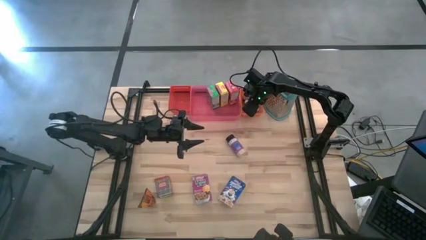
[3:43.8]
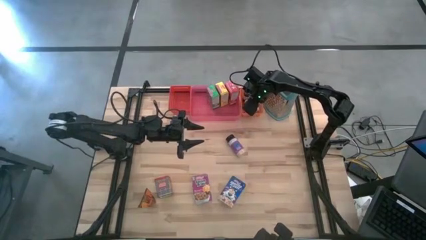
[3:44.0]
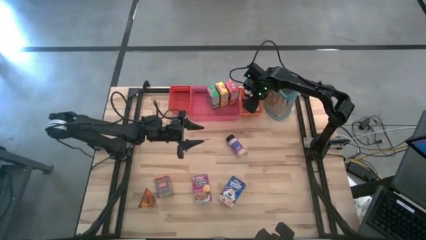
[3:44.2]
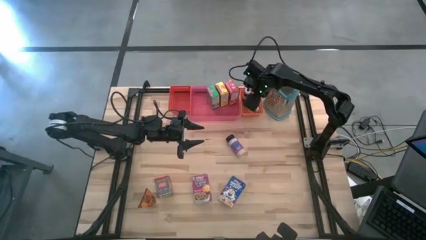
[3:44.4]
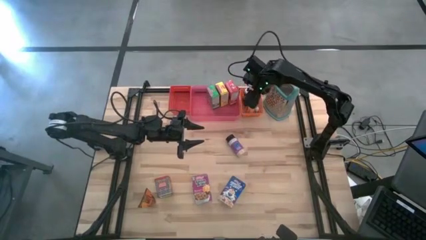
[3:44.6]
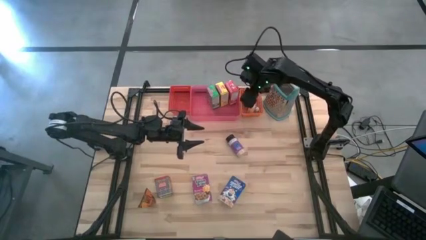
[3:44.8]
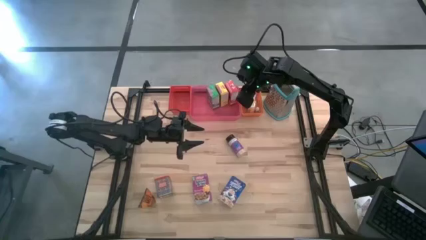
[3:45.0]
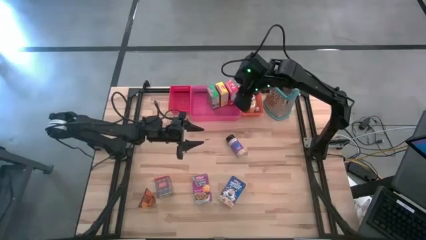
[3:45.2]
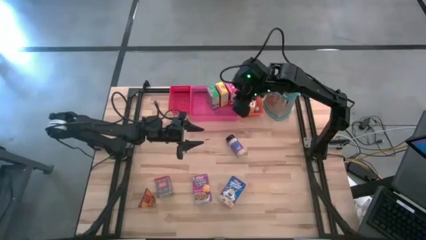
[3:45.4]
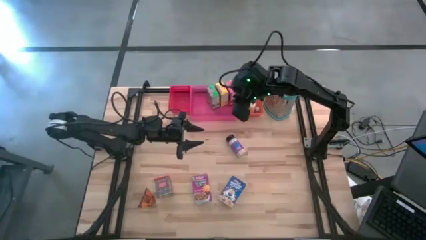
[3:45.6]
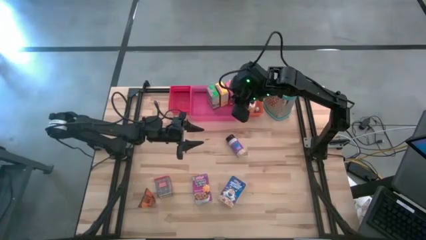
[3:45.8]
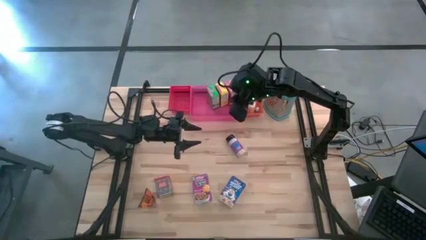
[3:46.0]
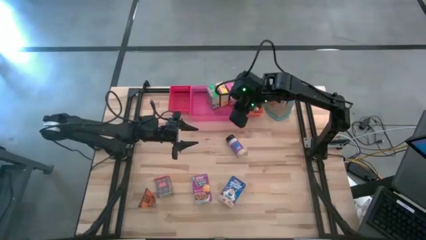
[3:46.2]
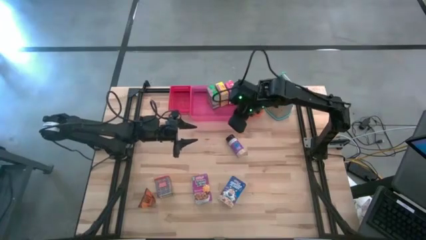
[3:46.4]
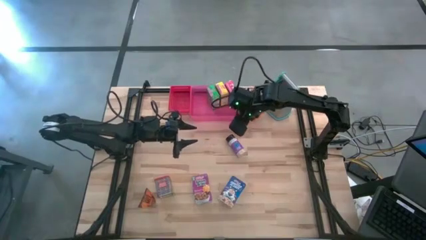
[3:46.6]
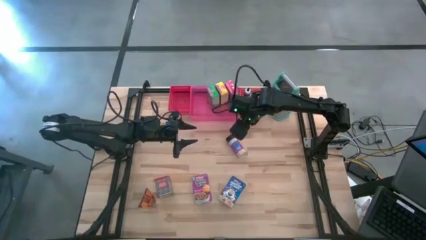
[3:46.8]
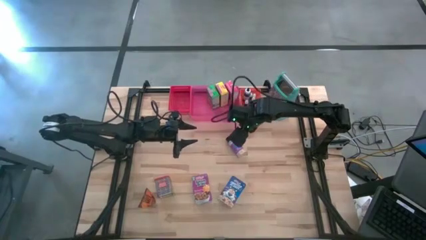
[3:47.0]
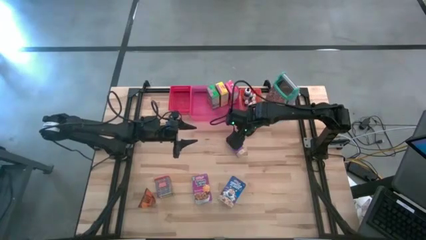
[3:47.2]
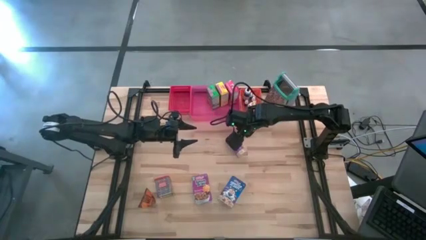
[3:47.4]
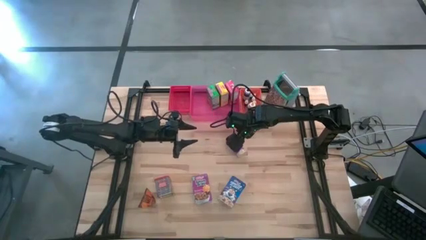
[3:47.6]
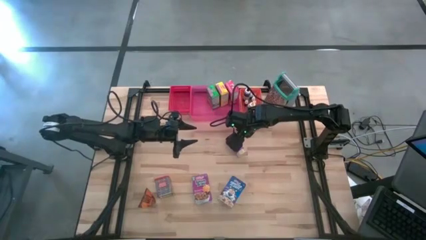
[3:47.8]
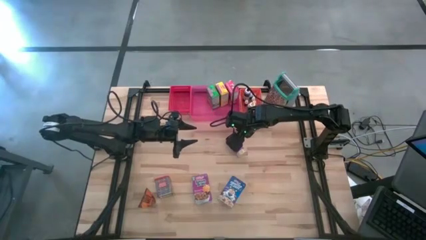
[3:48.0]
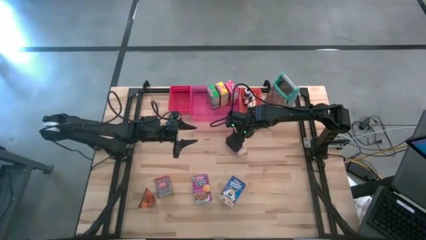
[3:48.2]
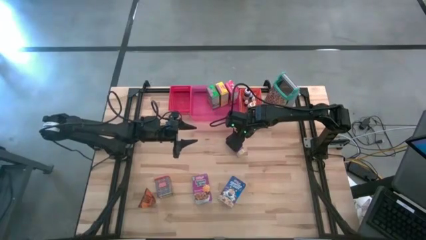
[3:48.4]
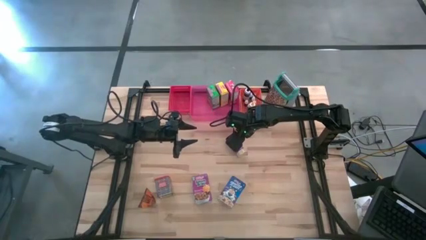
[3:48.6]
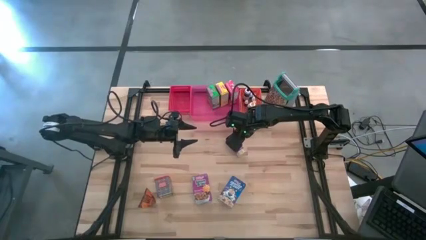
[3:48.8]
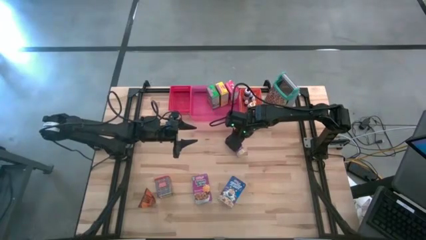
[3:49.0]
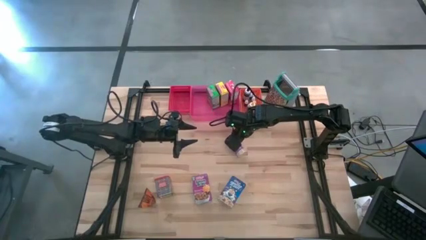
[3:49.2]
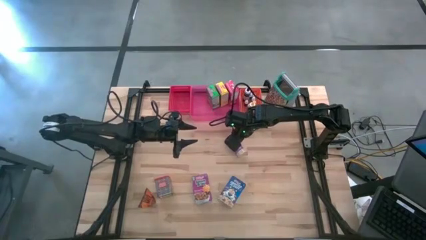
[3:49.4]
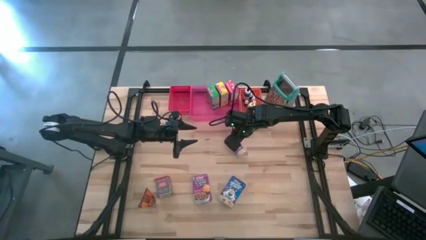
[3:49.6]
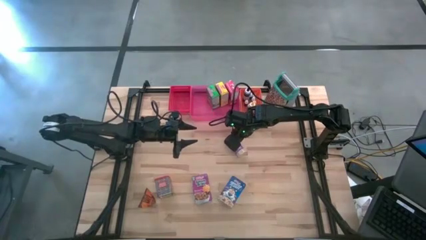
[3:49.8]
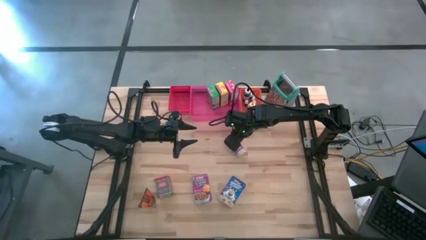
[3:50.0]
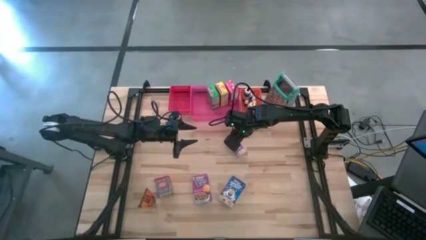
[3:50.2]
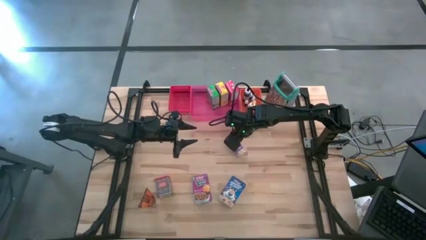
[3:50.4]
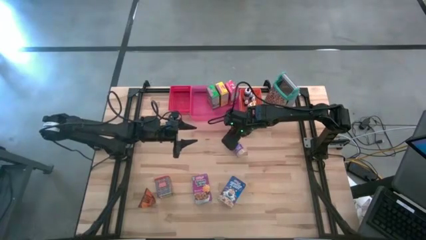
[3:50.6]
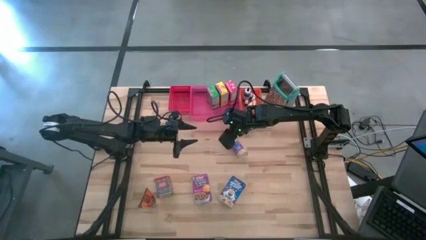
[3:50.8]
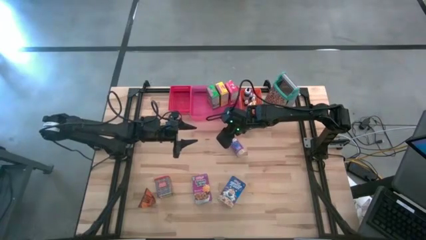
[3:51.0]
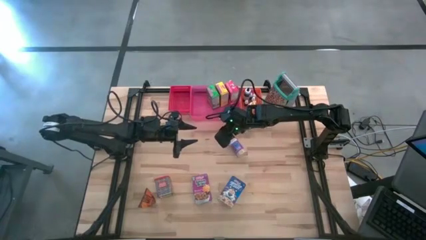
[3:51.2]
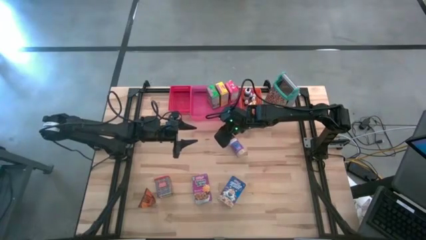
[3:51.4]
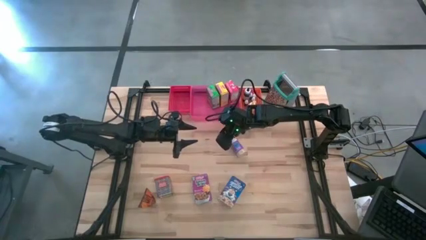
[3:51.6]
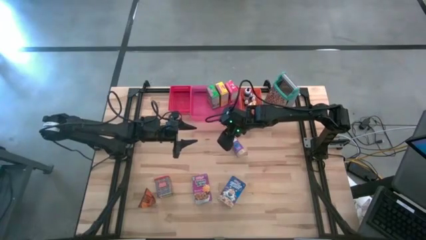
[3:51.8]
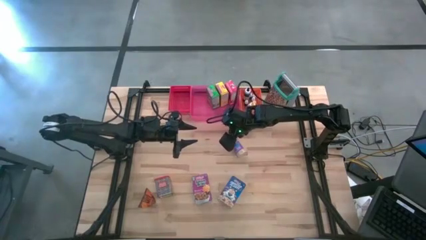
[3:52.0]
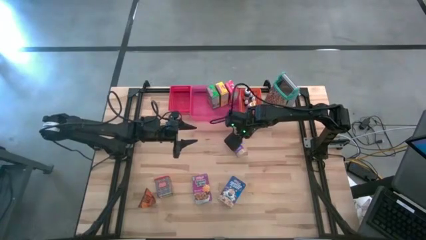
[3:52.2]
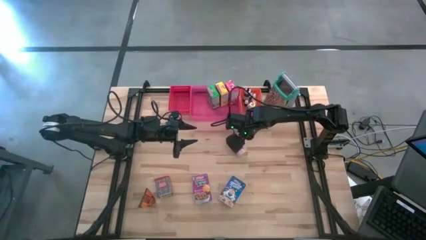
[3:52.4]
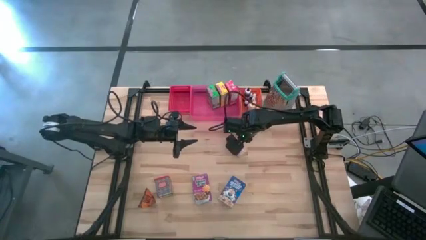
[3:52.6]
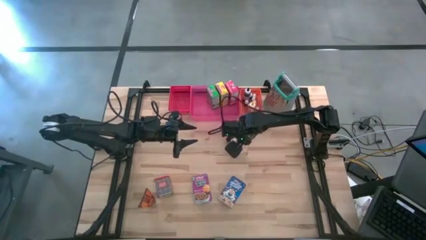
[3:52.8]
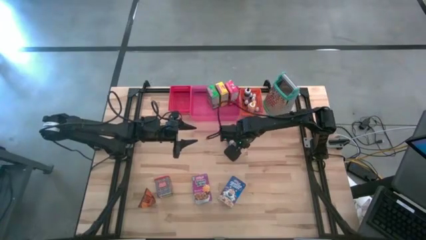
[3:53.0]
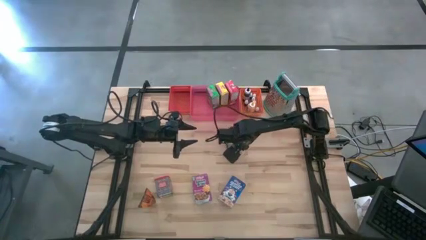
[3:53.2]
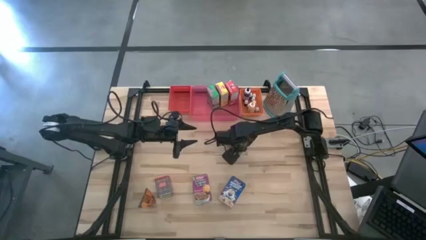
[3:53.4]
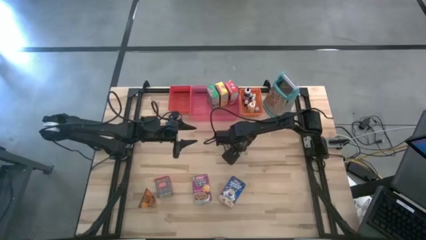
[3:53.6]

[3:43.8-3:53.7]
Task: Pick & Place Kitchen Items
Put the purple seasoning bottle into the red bin

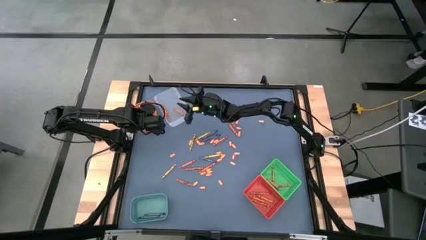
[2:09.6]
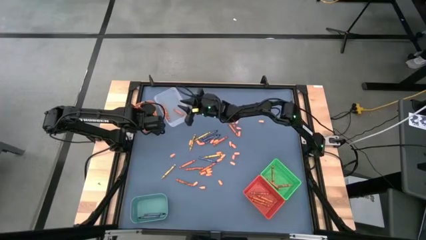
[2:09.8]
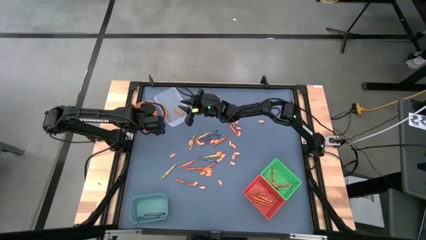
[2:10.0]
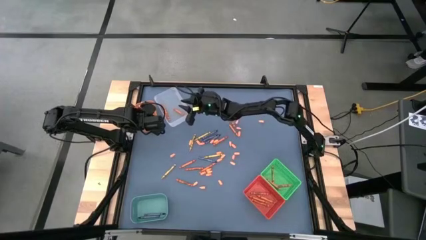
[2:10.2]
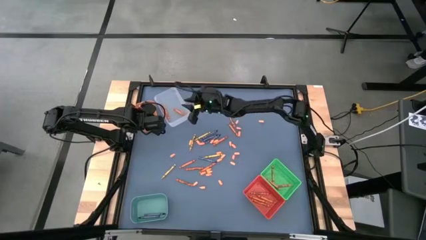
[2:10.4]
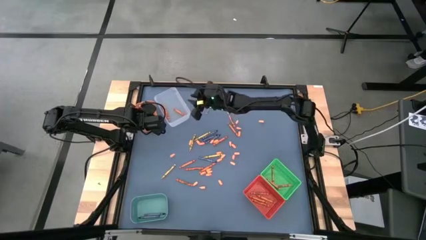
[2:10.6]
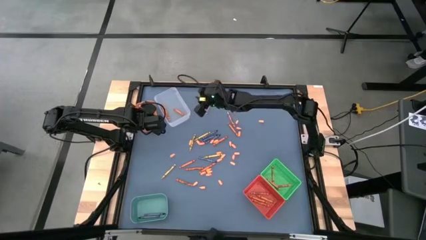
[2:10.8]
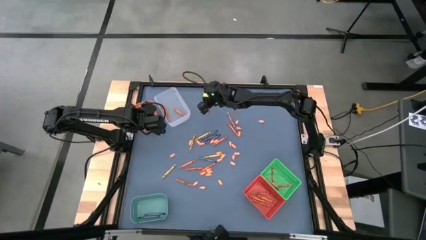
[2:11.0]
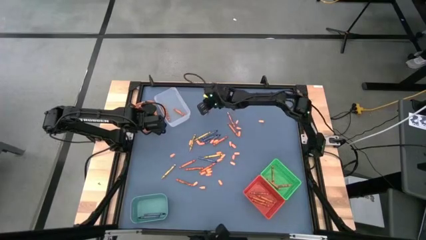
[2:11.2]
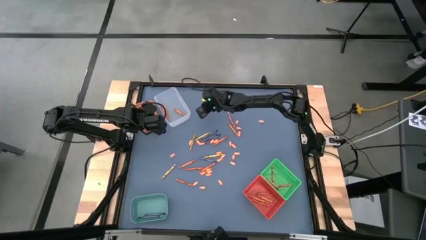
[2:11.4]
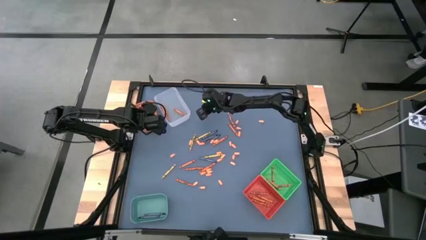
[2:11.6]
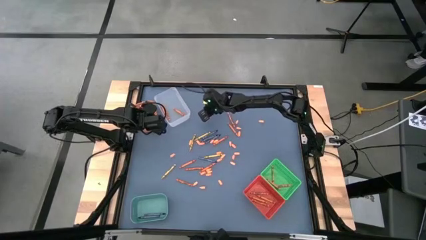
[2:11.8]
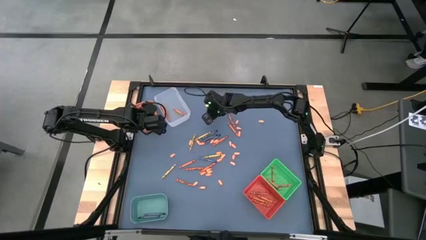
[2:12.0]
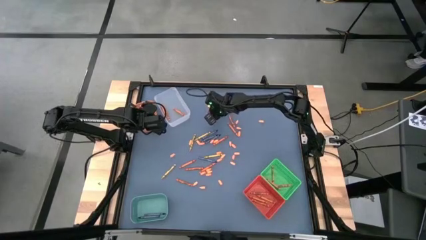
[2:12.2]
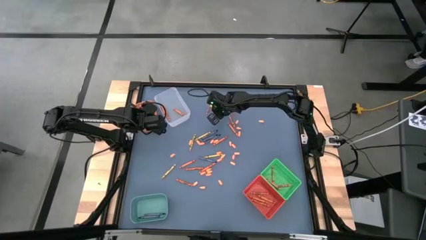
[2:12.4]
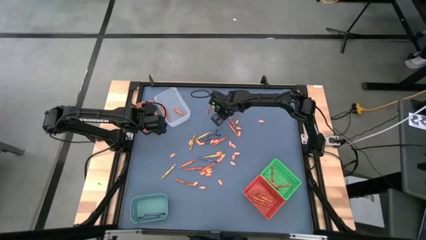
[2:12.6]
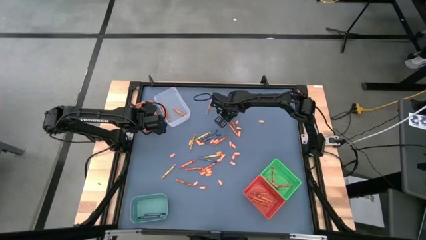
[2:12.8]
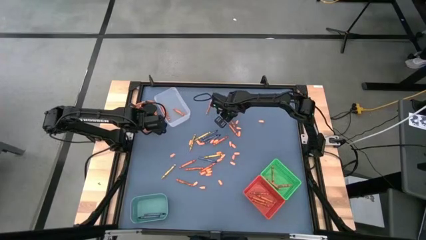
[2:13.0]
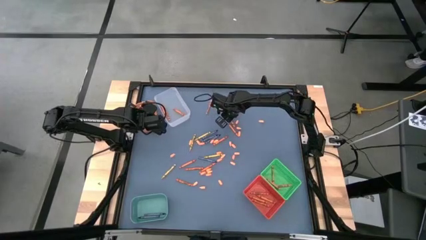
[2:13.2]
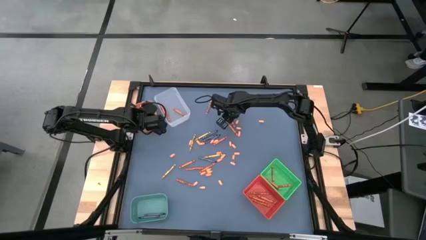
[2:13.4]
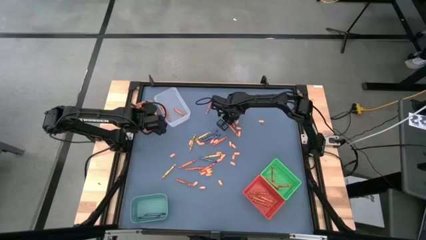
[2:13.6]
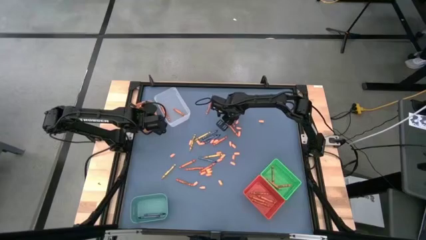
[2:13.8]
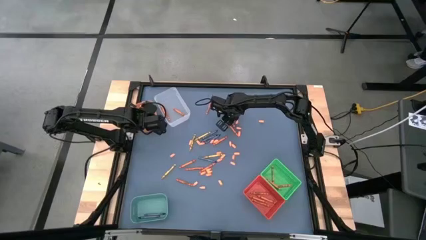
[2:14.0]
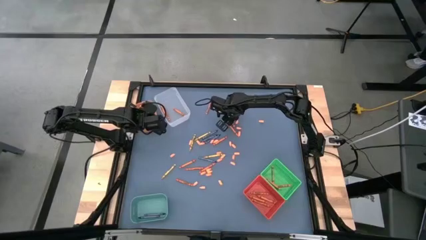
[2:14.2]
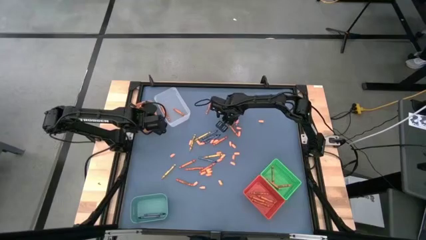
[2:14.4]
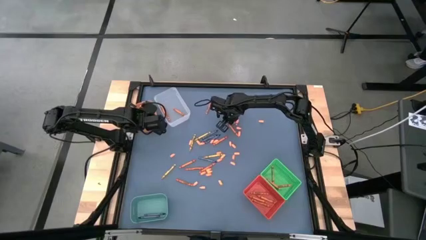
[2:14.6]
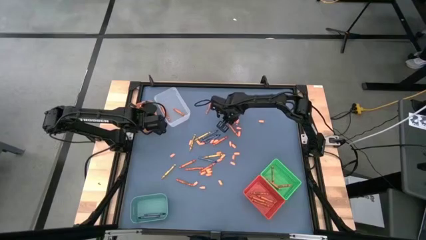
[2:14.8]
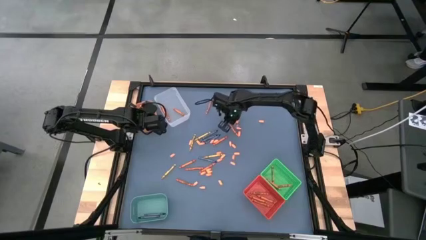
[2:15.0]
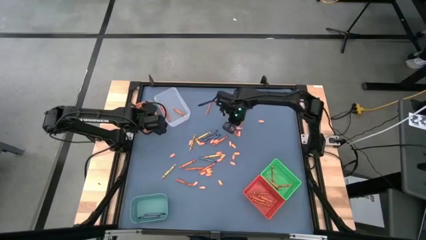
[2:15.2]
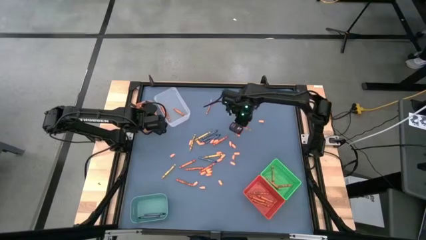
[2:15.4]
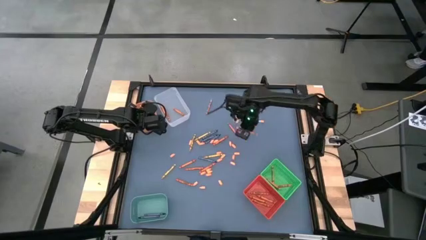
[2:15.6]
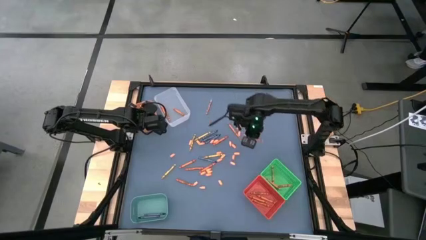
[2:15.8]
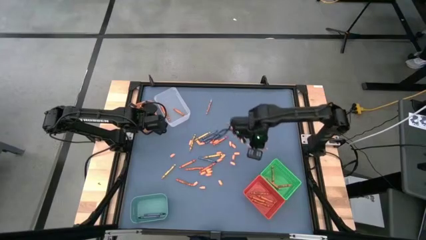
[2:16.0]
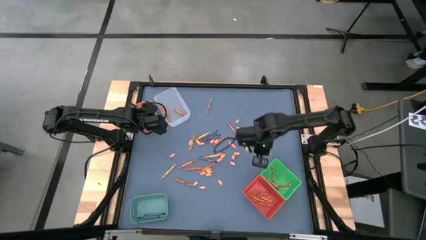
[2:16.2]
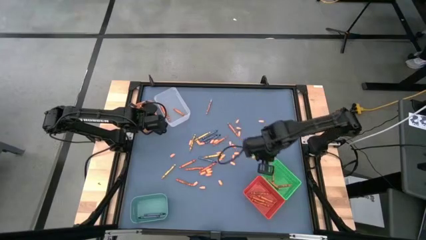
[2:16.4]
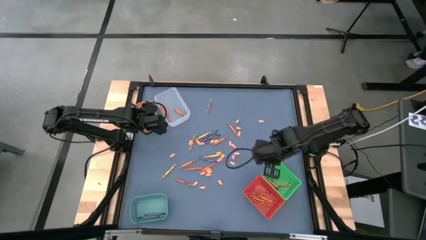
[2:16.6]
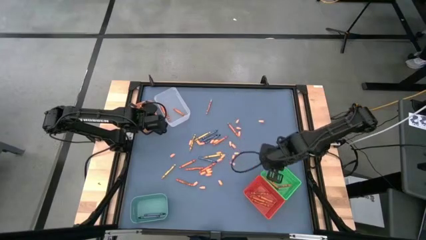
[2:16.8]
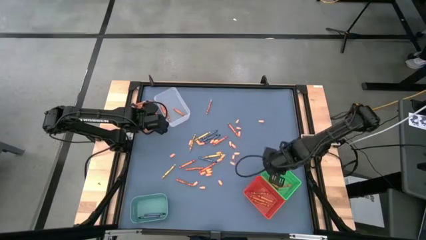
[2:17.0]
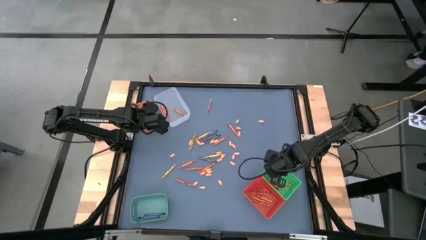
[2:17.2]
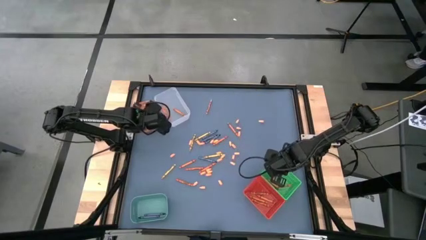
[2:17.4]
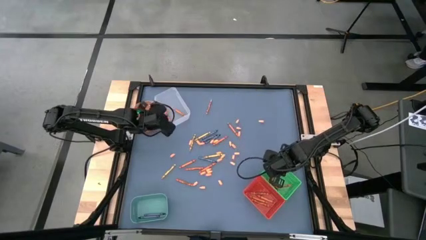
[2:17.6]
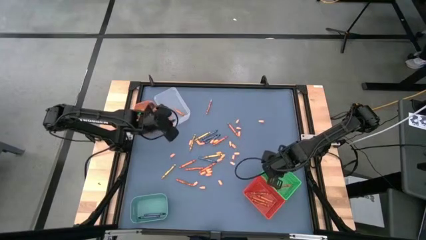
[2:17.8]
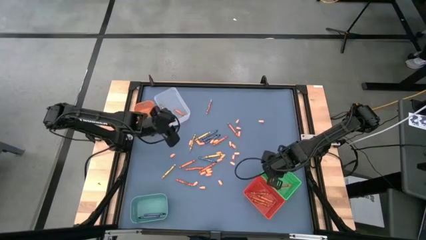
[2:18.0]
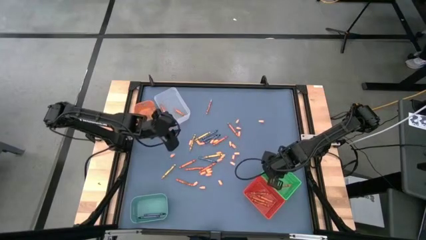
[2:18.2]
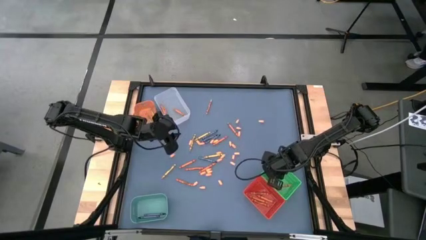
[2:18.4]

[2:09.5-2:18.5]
Task: Sort crayons
Put the light orange crayon into the green bin
